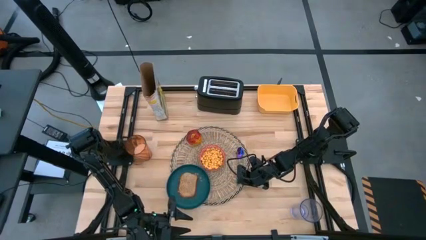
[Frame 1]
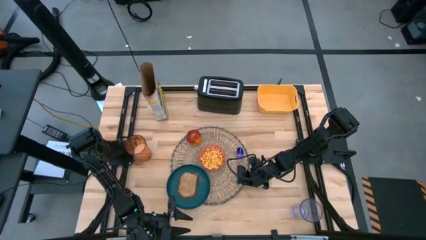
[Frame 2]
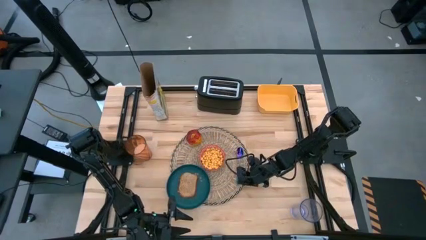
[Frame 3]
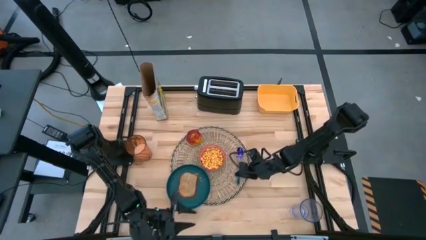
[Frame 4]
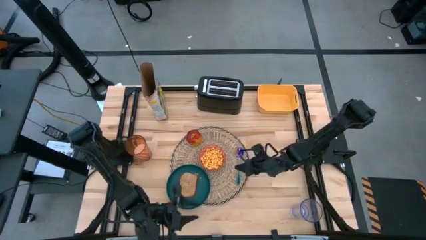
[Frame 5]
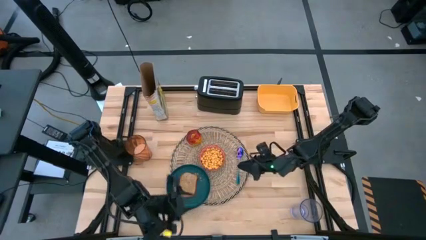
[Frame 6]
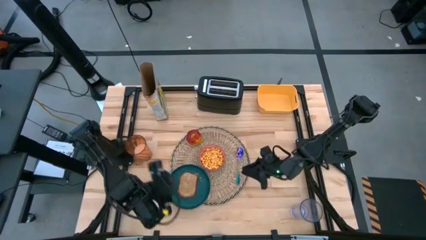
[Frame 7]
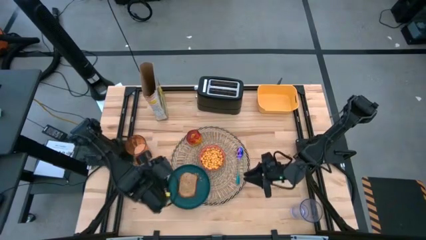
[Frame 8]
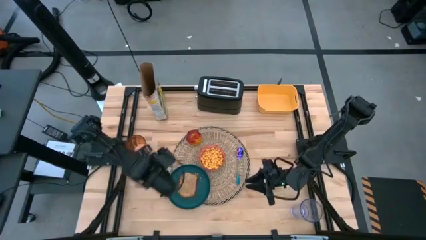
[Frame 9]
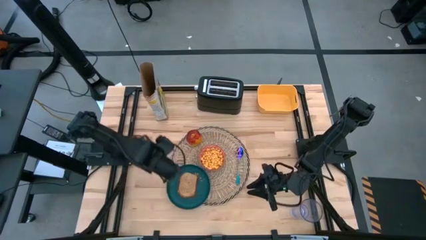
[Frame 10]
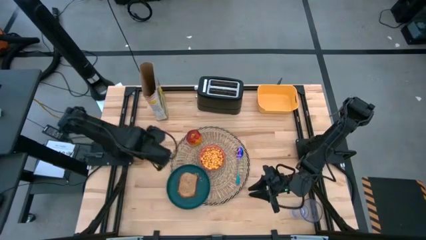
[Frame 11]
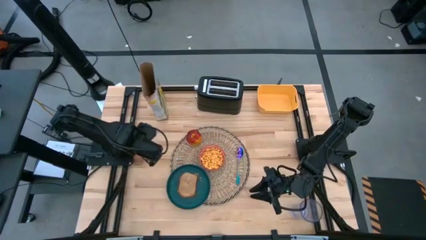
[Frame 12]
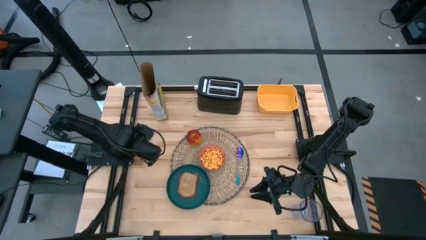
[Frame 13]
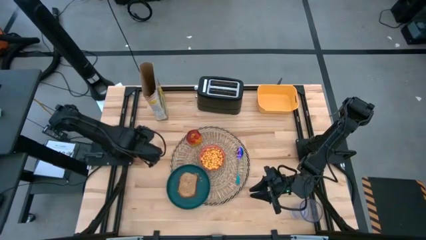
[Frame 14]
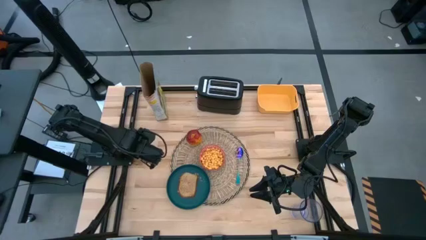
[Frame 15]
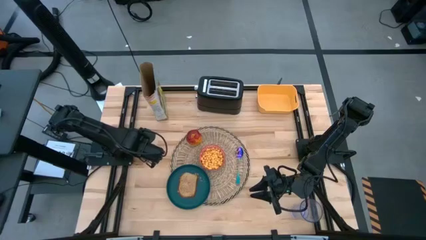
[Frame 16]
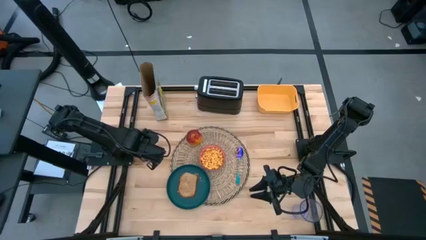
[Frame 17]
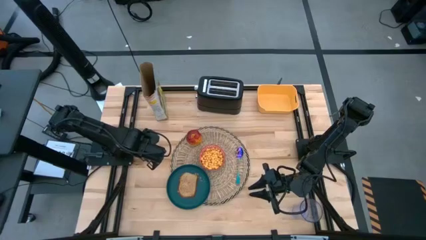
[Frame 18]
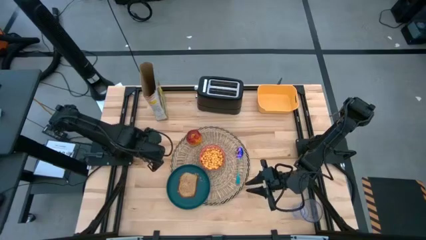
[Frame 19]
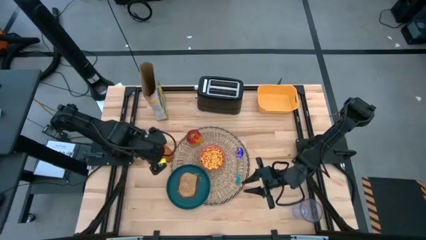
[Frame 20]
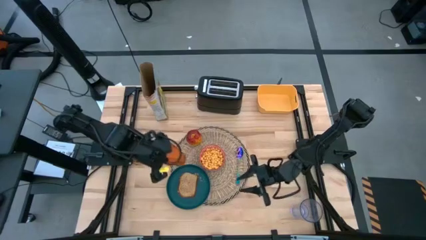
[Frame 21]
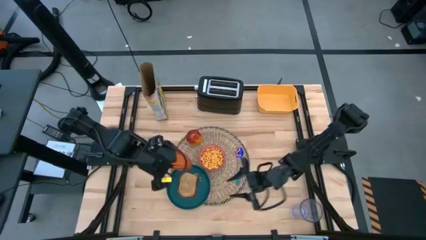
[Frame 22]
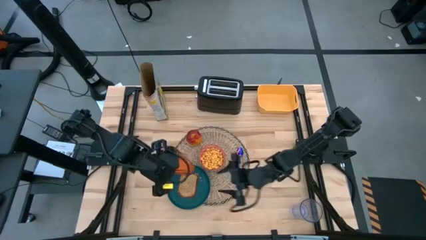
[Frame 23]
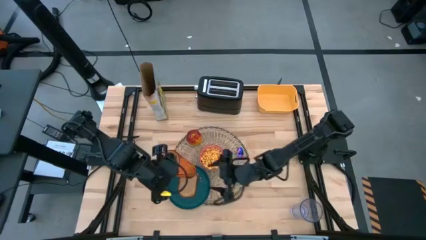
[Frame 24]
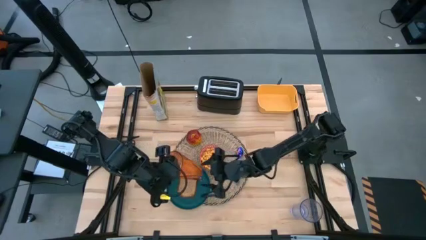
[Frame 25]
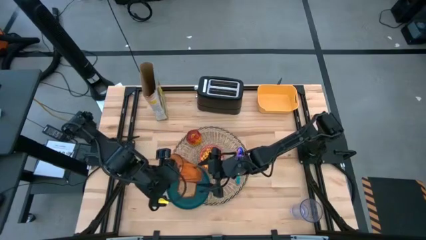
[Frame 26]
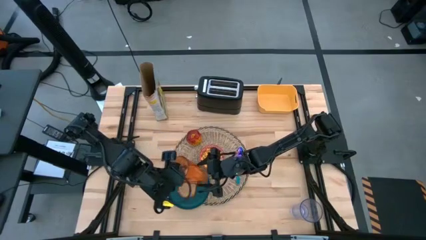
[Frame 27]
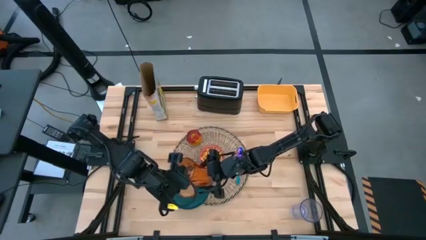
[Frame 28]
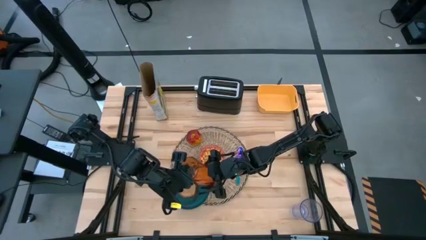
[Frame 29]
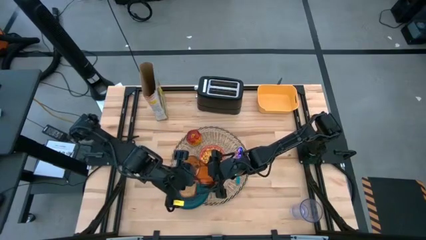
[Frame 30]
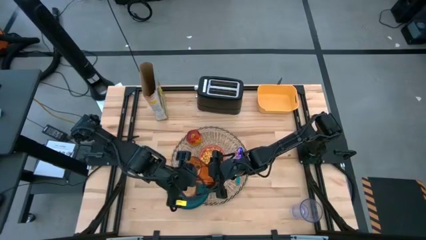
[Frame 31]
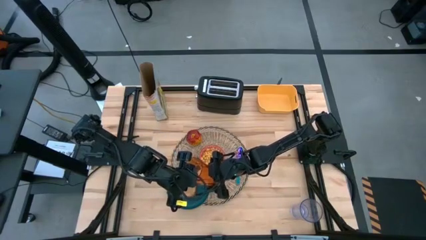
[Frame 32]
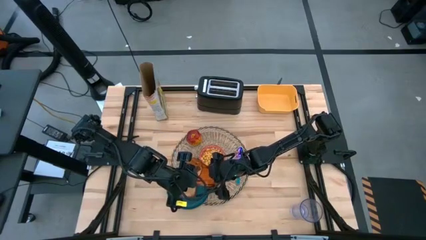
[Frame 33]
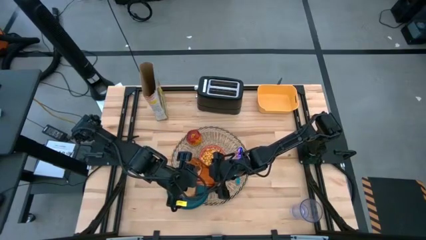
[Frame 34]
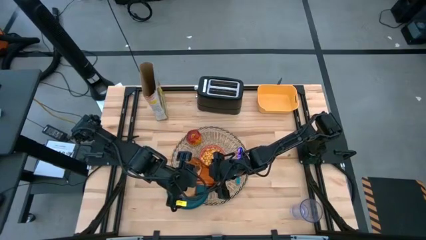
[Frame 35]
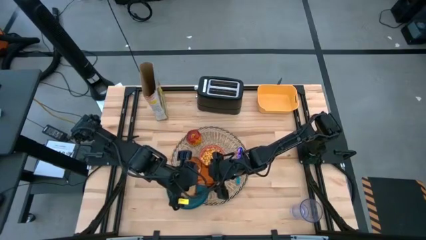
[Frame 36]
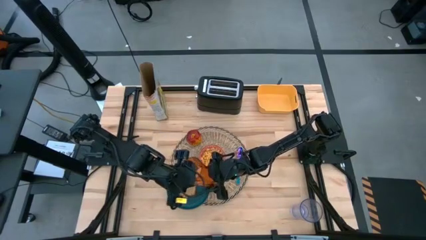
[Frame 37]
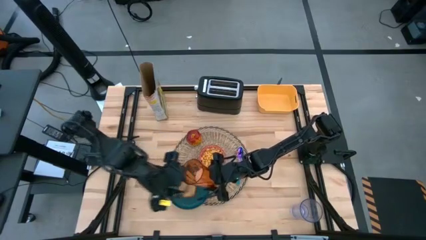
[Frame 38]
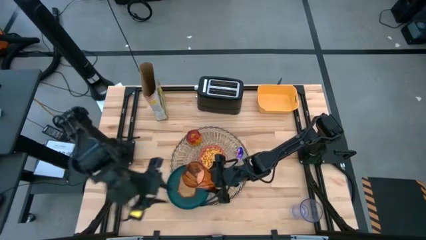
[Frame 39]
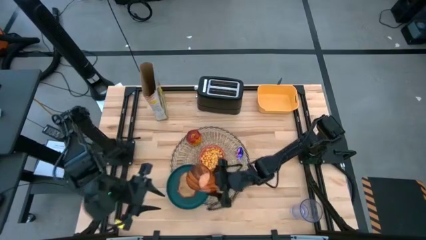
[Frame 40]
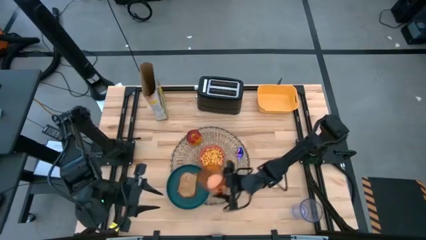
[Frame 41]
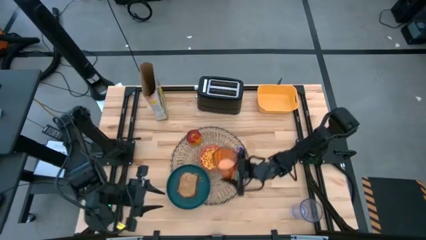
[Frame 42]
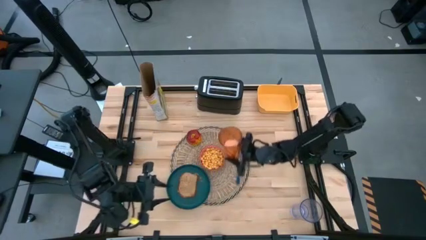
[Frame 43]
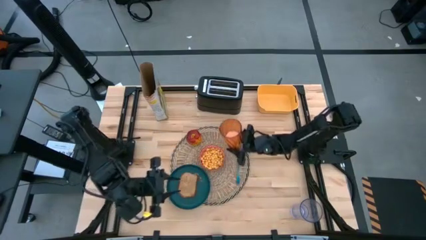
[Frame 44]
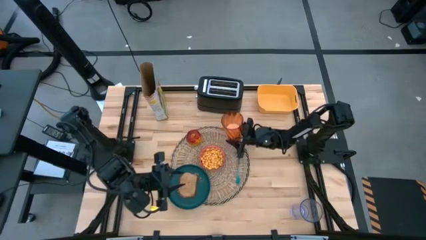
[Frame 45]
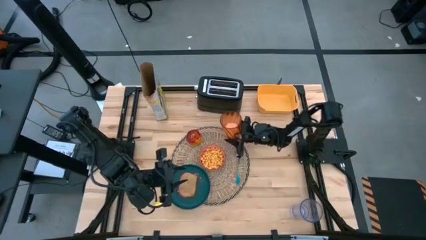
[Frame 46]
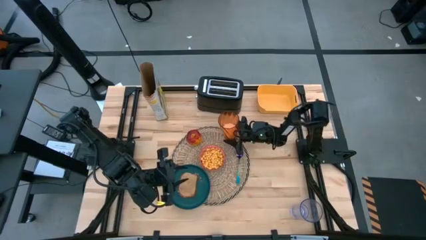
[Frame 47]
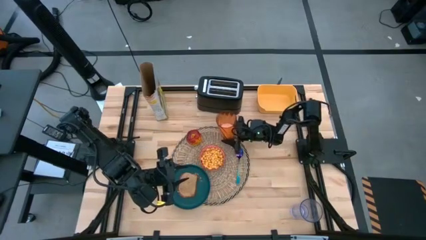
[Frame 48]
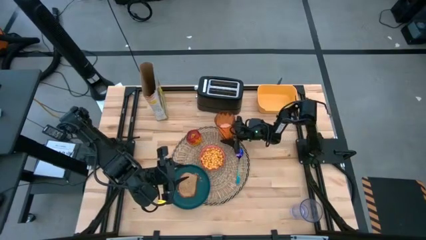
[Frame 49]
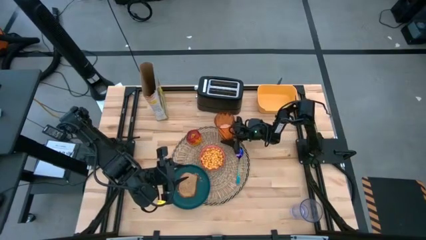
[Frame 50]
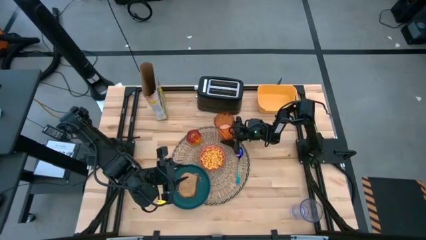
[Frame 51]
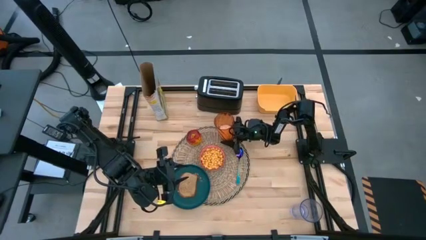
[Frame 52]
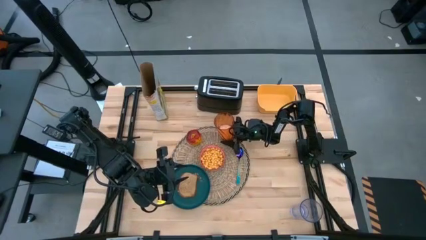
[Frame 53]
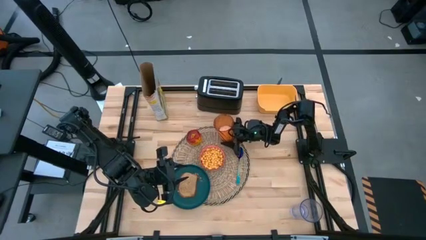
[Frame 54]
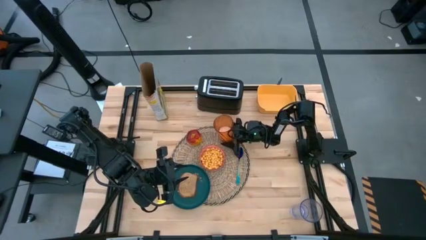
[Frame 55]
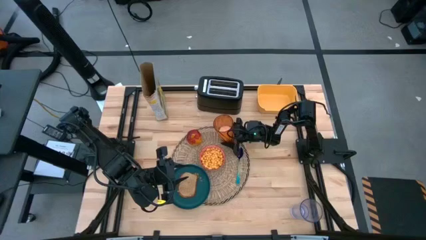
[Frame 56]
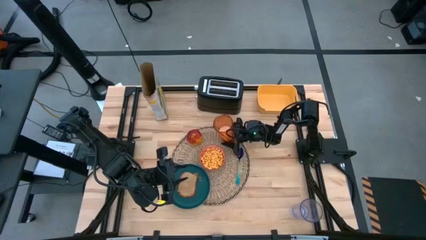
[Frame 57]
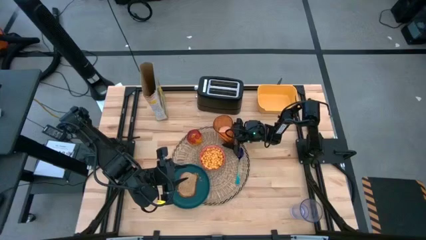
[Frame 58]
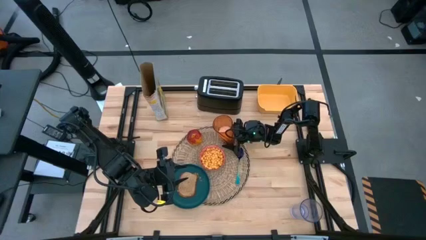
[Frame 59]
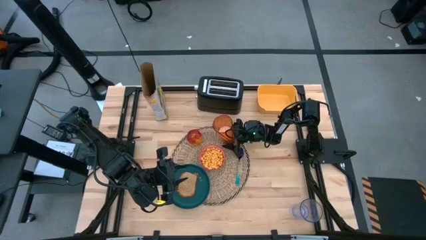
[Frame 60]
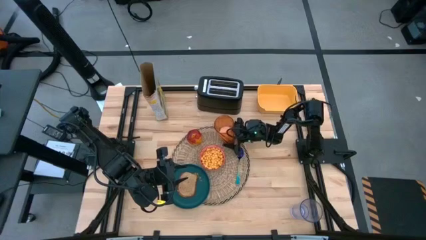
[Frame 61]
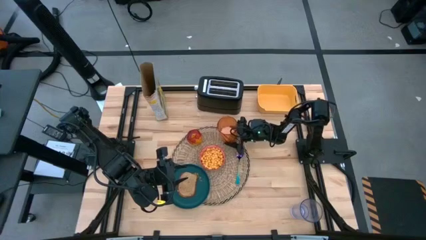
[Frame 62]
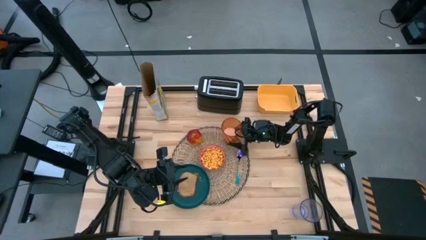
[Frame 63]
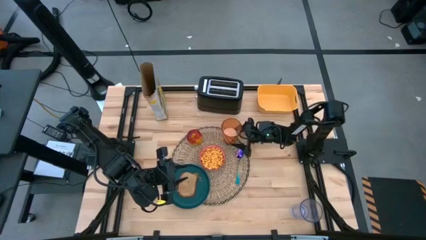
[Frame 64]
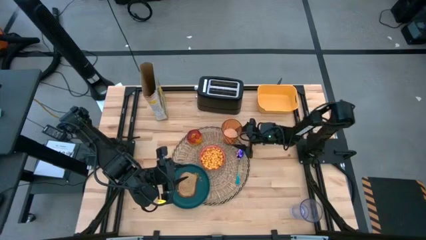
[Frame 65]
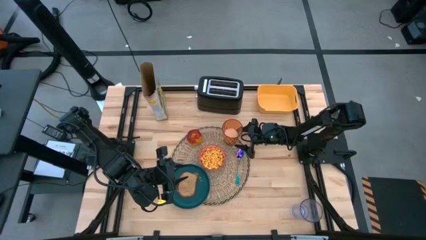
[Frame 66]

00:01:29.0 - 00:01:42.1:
Task: Arrange a breakfast setting
Put the orange glass on the brown placemat at the top right of the red patterned bowl

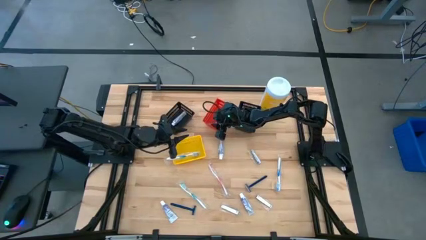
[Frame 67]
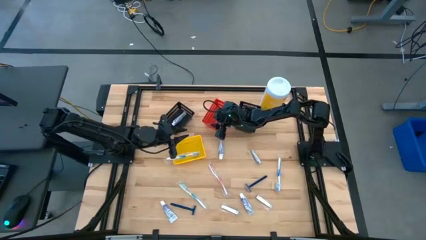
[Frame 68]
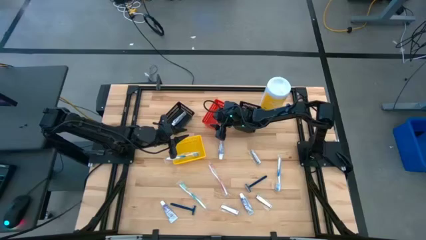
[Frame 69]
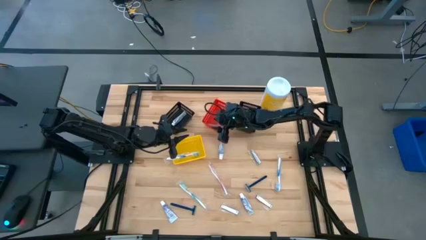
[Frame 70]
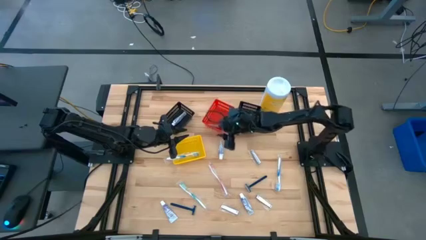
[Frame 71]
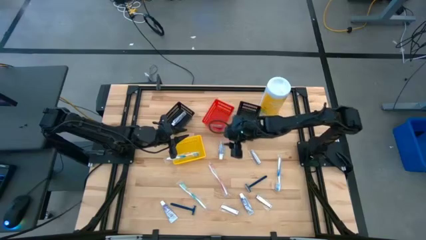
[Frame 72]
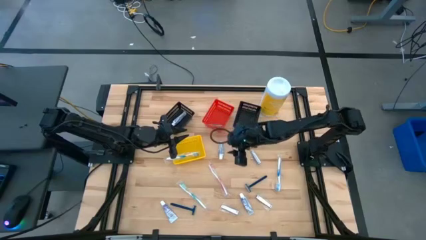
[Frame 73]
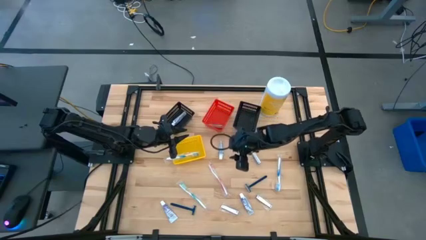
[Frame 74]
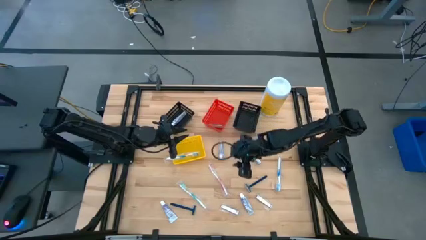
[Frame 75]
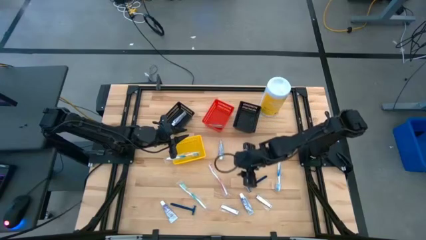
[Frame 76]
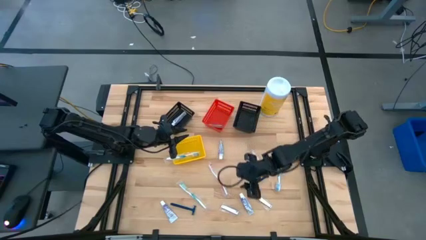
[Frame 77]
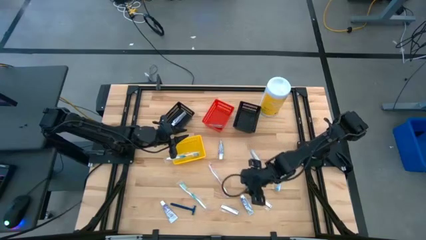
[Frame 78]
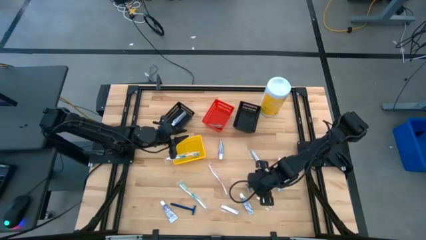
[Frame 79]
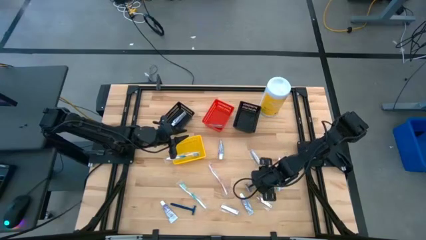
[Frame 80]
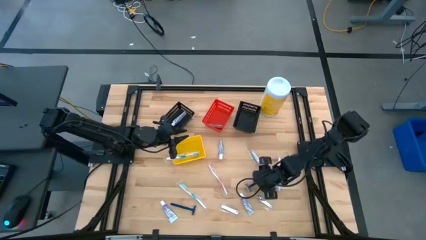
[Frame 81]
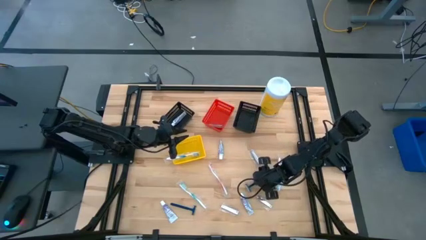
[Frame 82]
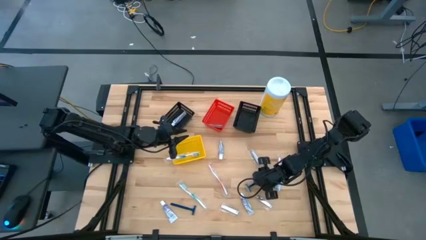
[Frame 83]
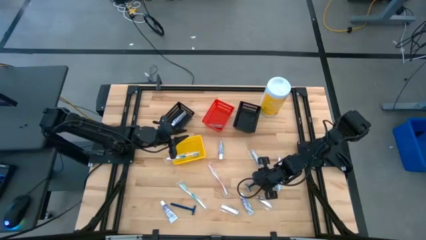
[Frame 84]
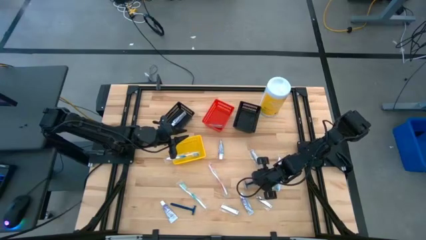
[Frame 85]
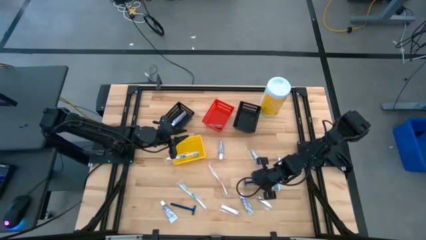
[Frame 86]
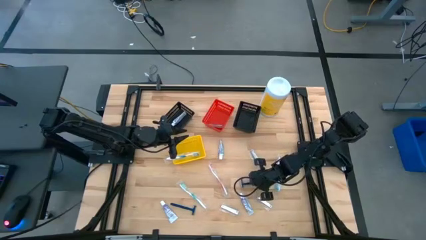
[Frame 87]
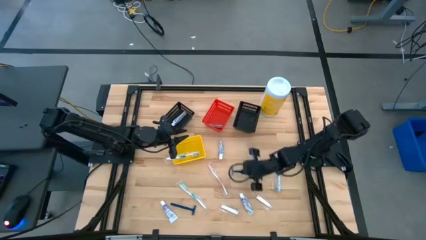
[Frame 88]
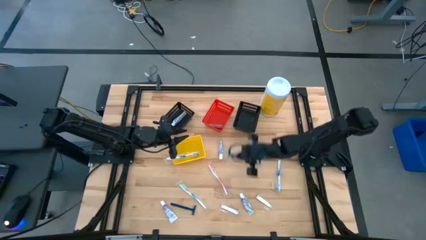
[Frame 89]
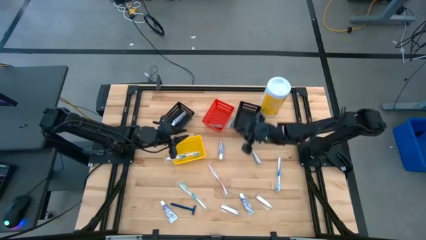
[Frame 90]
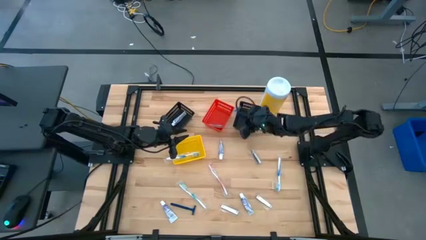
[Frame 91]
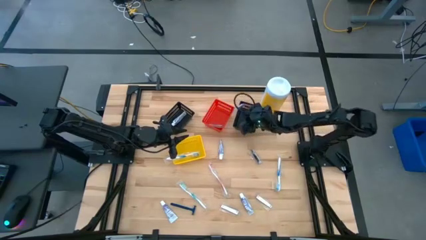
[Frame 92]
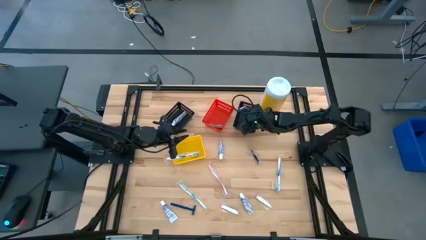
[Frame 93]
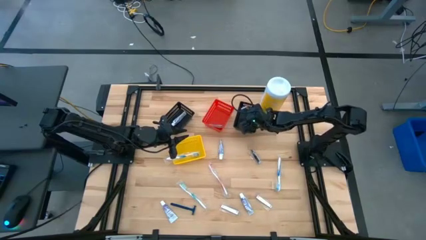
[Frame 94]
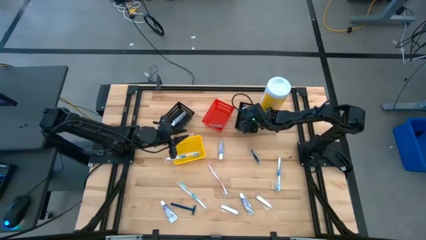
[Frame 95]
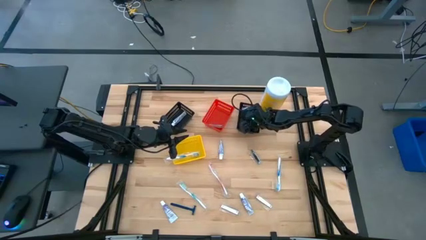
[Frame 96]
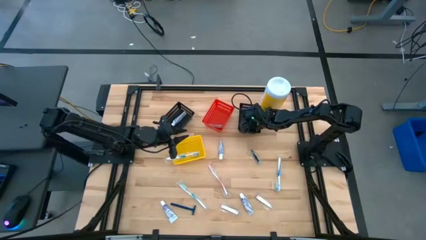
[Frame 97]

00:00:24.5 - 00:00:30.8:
Task: Pick & Place Travel size toiletries
Put the right razor into the right black bin
